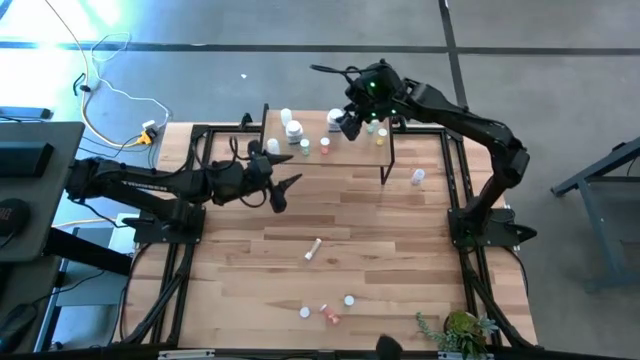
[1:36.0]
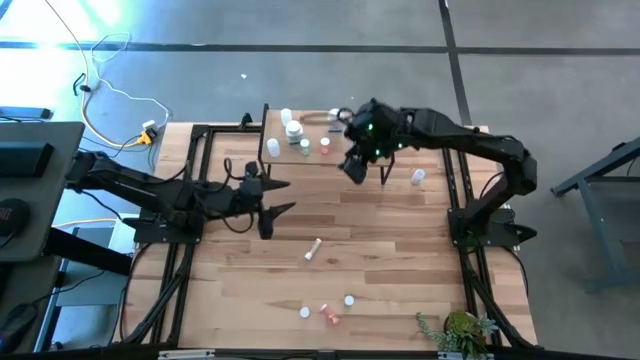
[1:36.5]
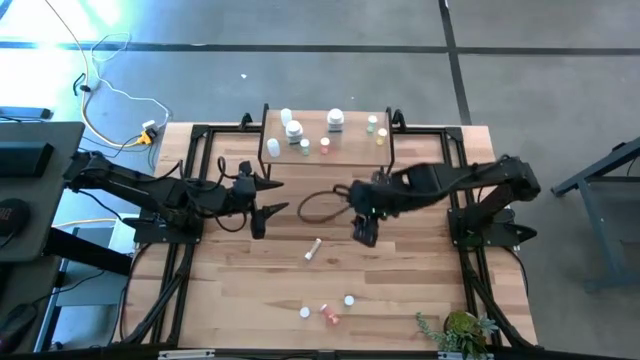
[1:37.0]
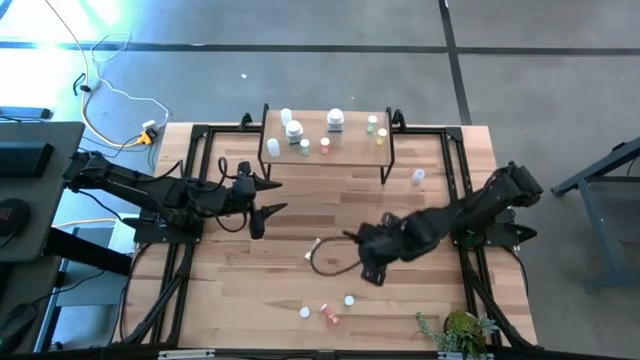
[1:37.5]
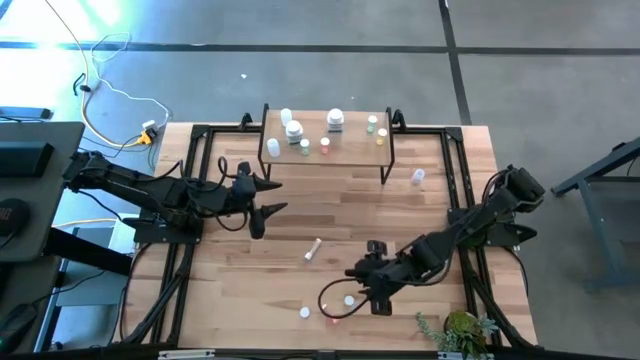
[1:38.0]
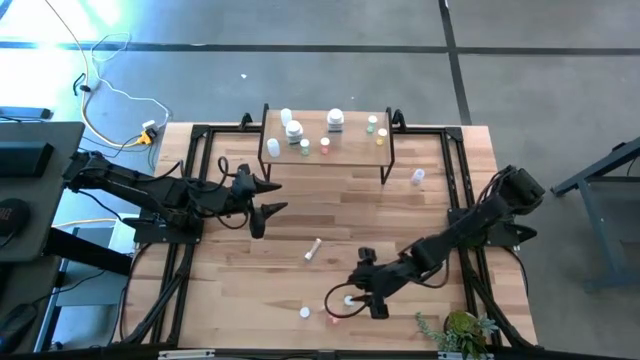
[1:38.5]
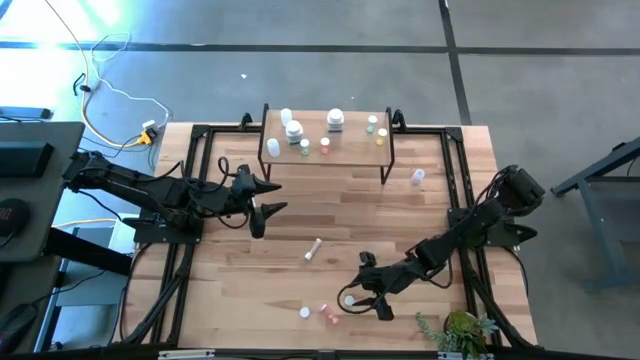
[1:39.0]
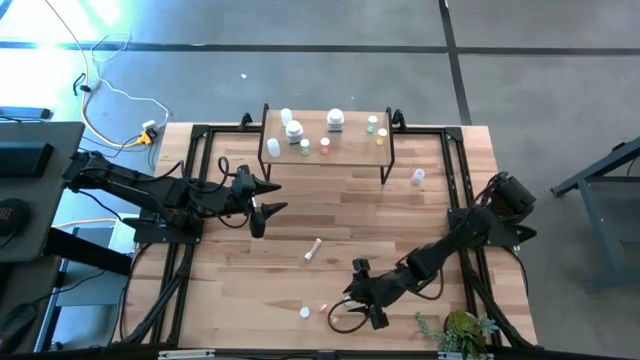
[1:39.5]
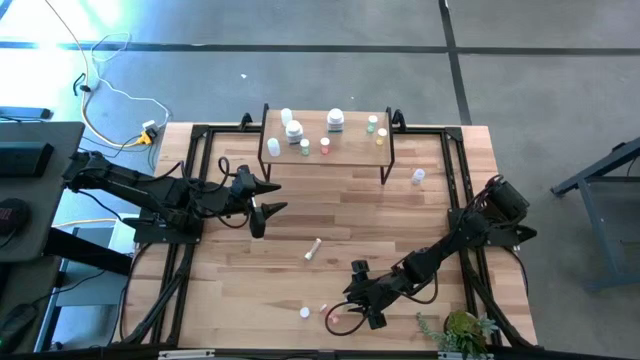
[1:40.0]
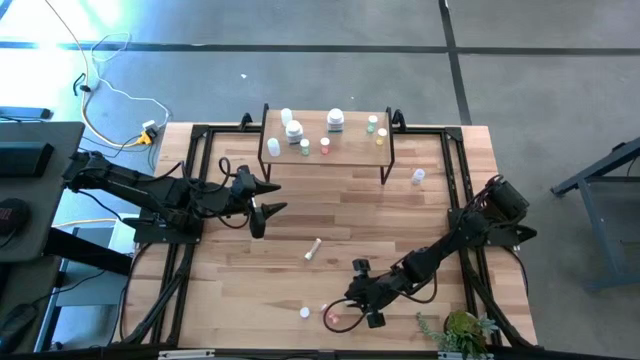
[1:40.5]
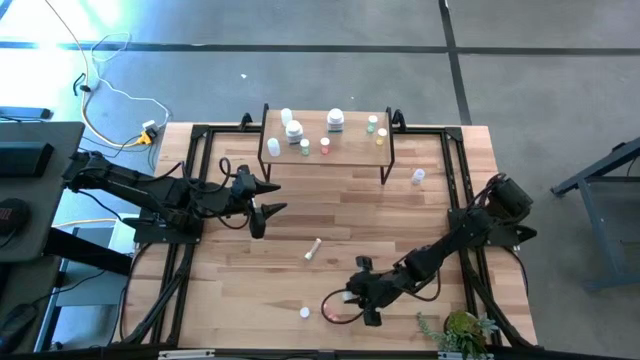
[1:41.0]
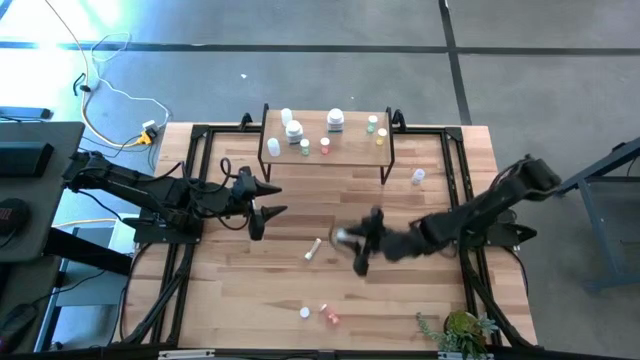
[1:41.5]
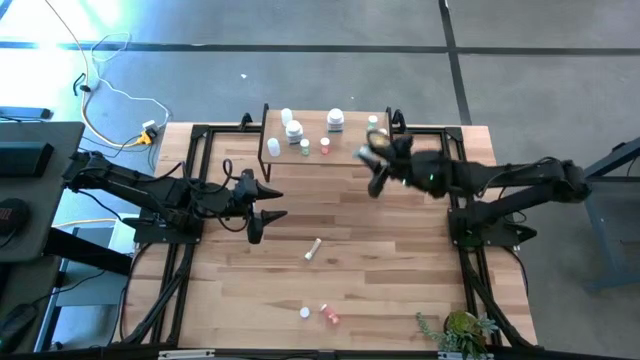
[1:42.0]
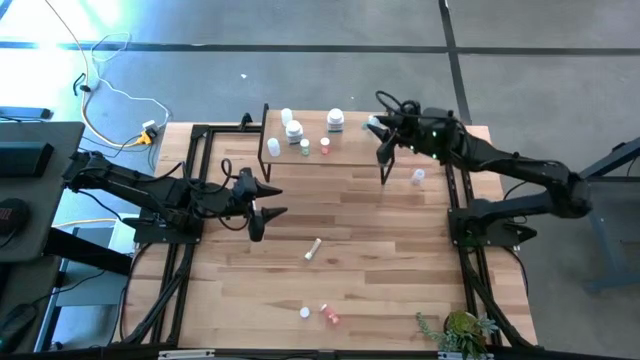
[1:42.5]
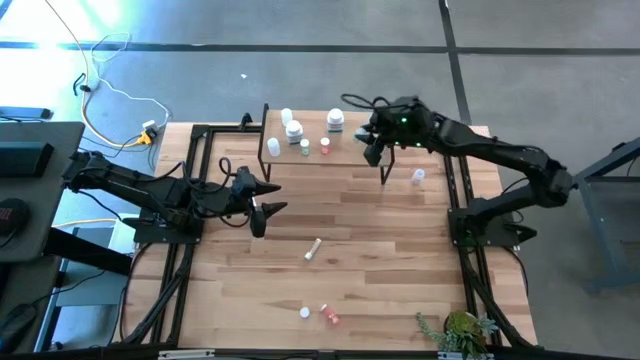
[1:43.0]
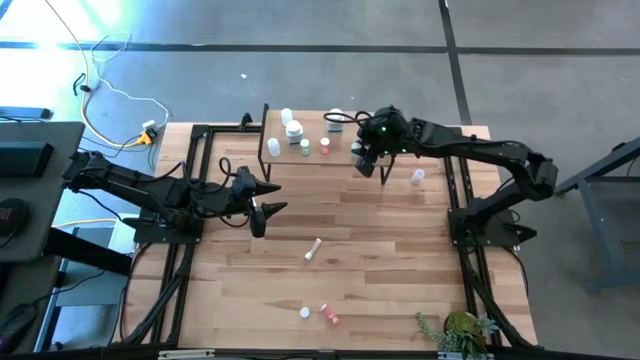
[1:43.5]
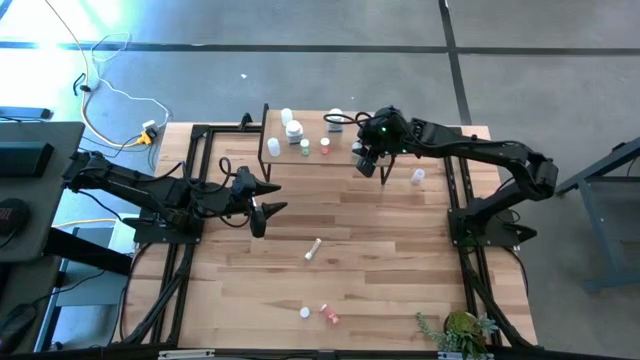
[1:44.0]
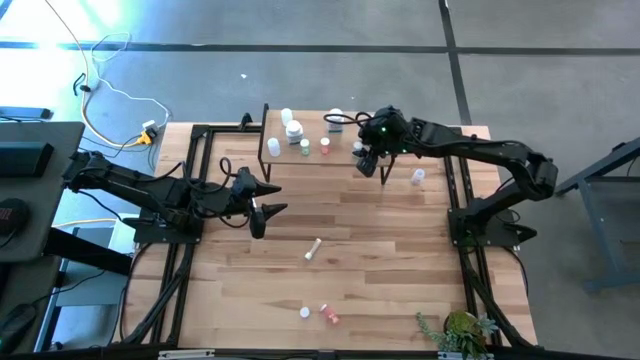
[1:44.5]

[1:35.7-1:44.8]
Task: Pick and place medicine bottles onto shelf by color
Put the blue pill bottle on the shelf

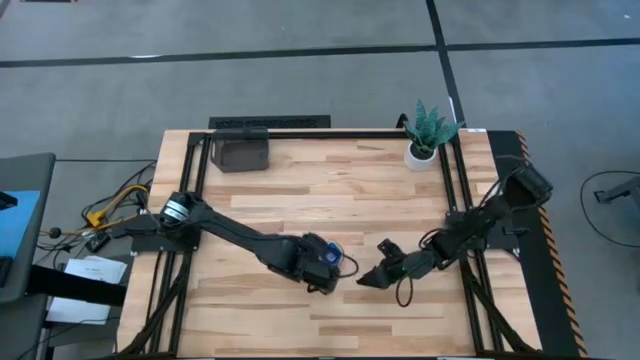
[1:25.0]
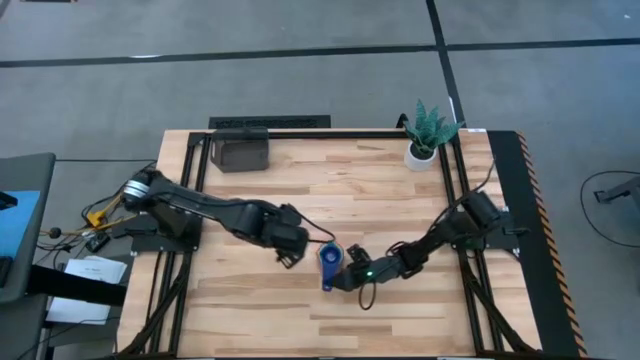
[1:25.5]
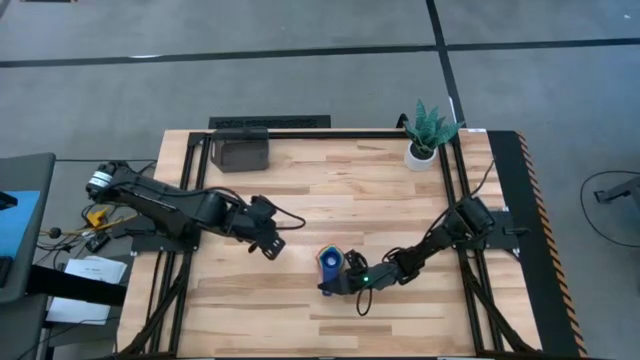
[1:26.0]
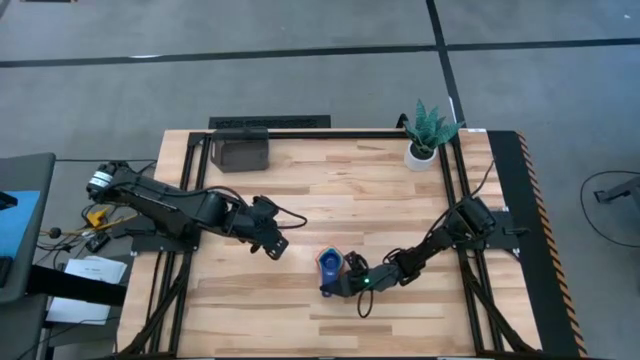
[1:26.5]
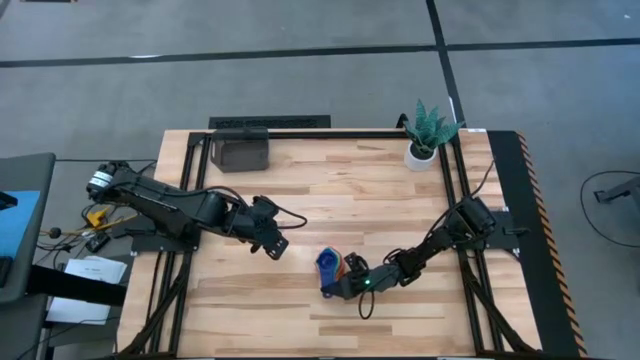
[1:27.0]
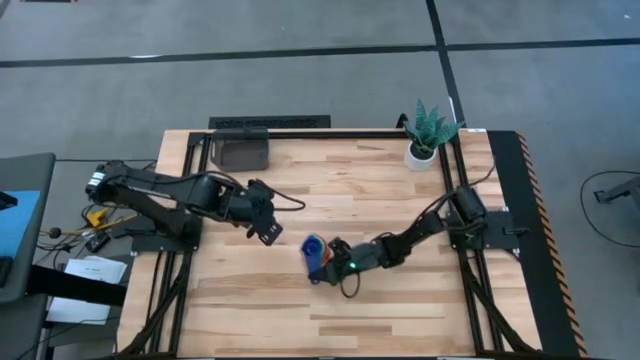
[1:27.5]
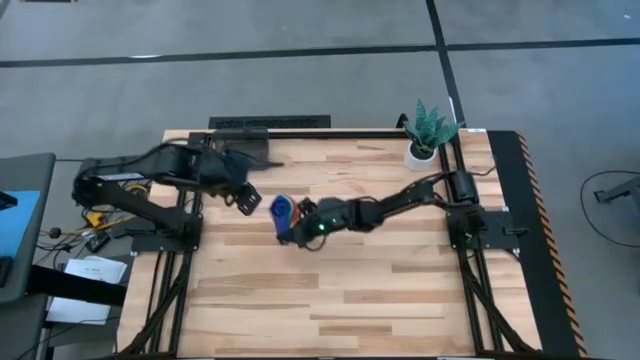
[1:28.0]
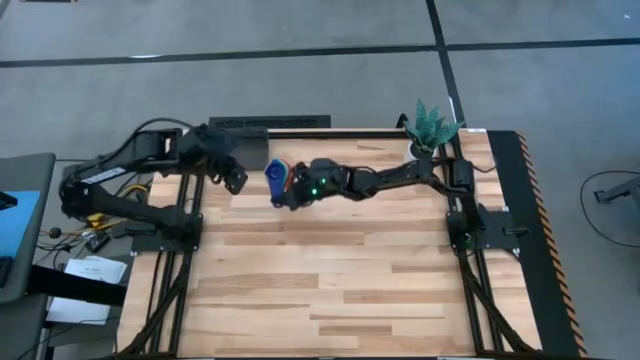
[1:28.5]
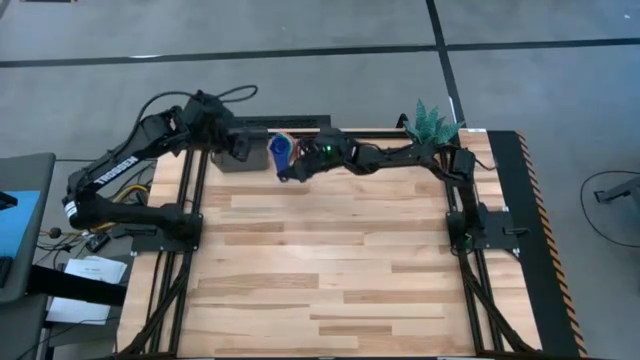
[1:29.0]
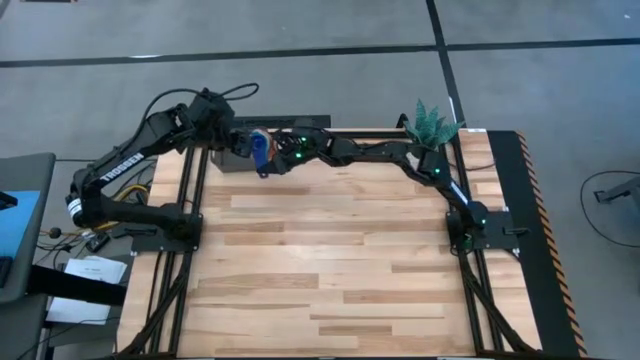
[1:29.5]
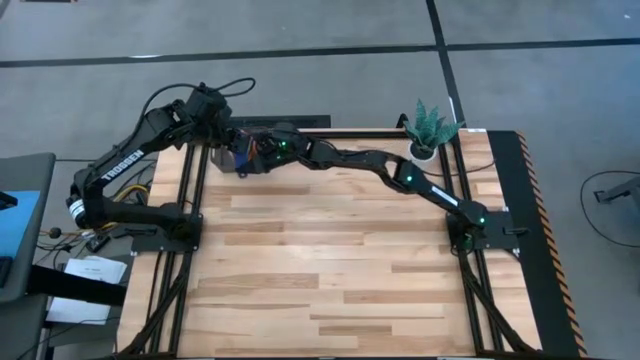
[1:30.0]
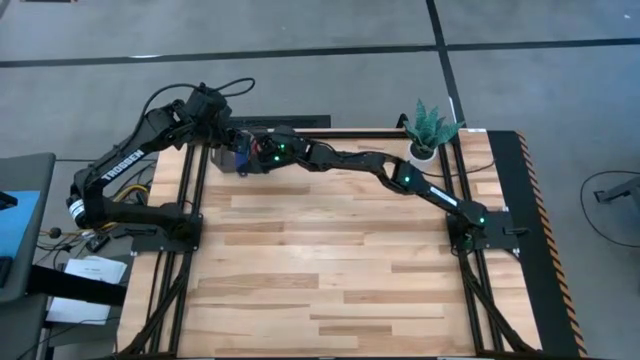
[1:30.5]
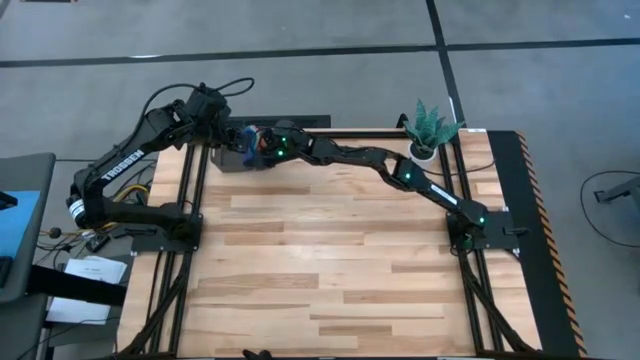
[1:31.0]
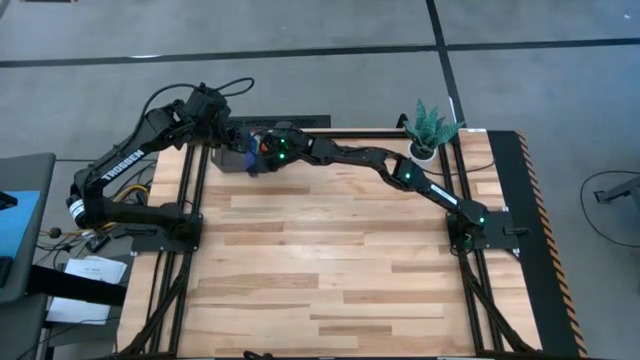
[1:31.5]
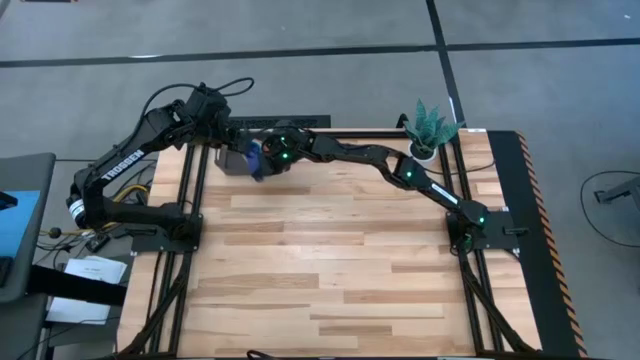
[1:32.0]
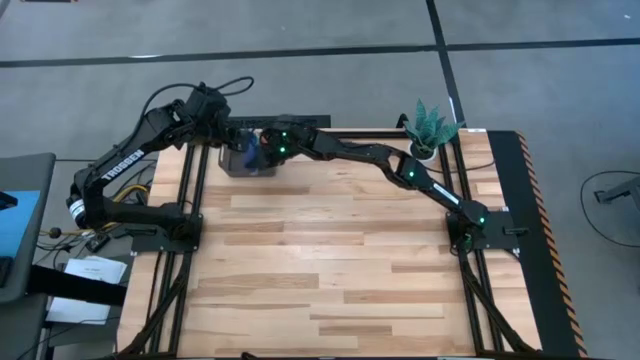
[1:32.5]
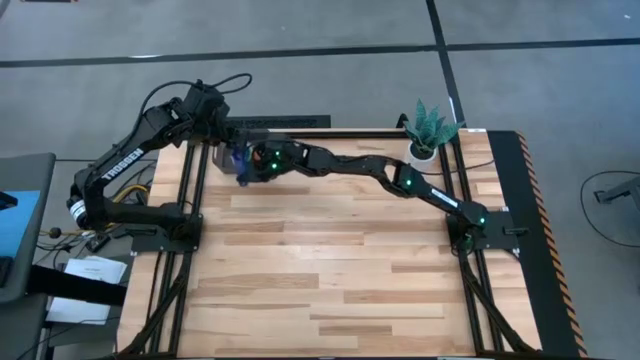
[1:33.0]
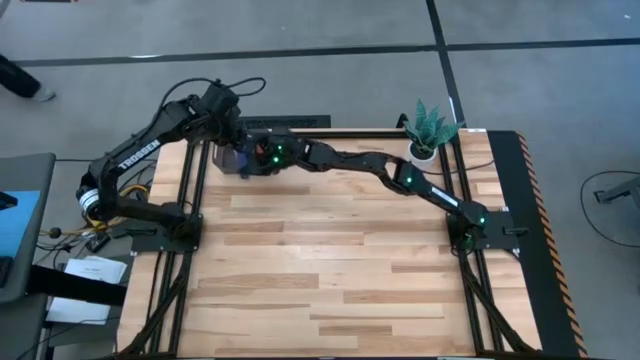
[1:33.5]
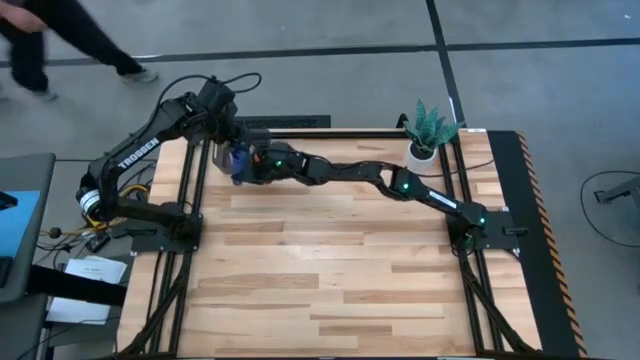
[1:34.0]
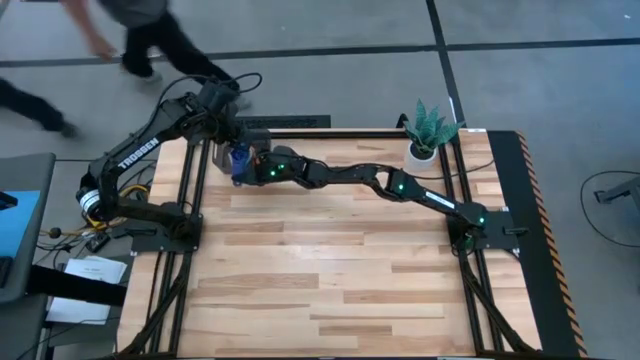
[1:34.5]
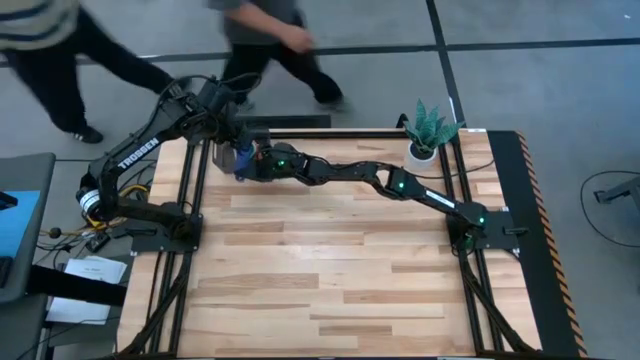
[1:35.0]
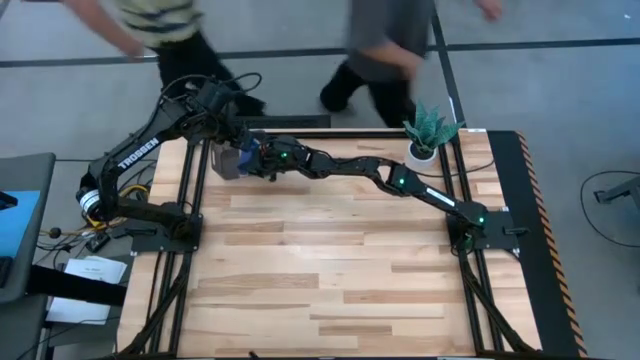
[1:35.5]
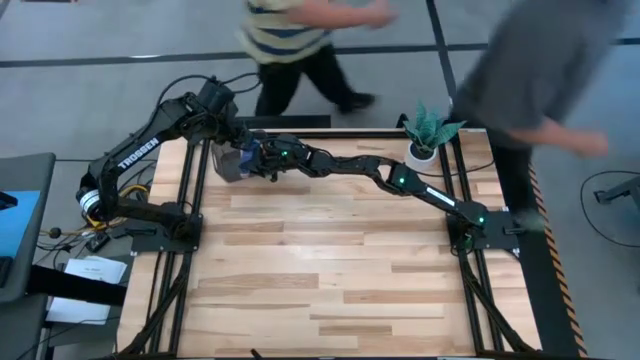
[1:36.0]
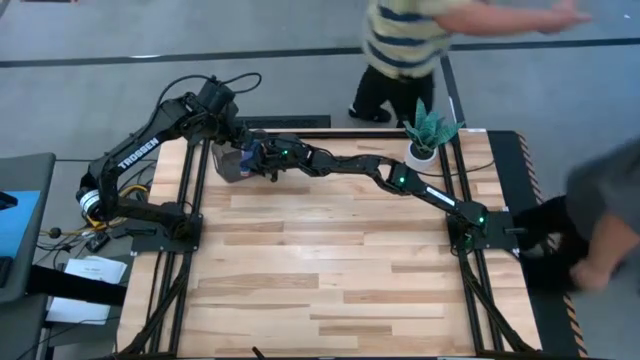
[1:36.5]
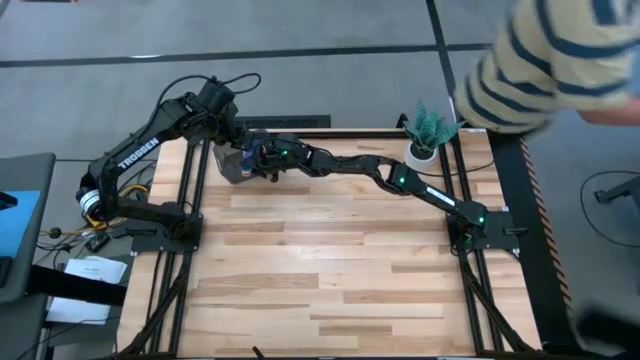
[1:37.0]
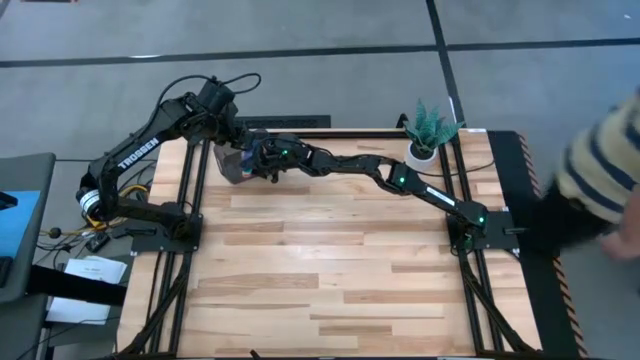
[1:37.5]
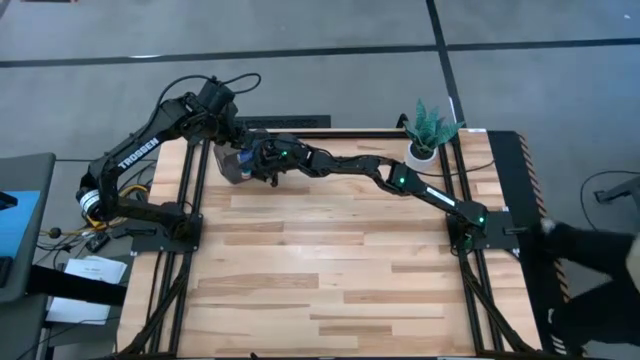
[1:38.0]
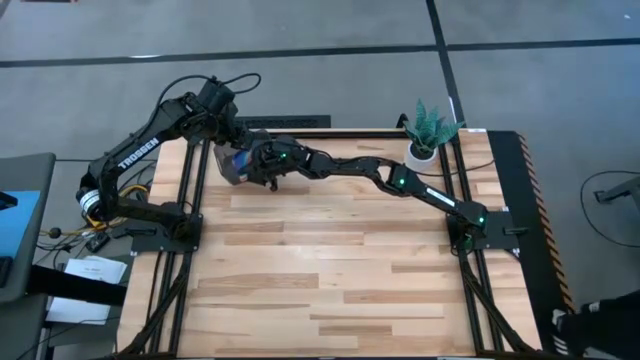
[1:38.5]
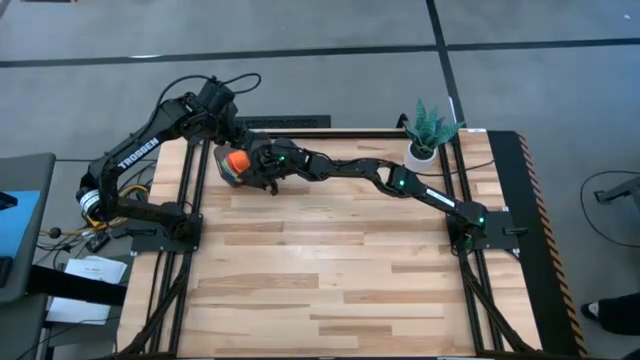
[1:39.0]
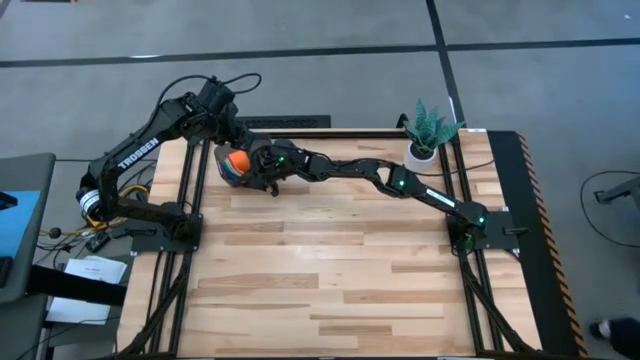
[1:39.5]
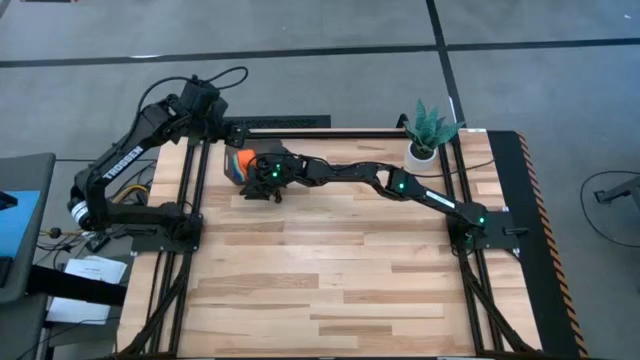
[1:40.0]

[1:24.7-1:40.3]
Task: Nest measuring cups in basket
Put the stacked measuring cups into the black bin
